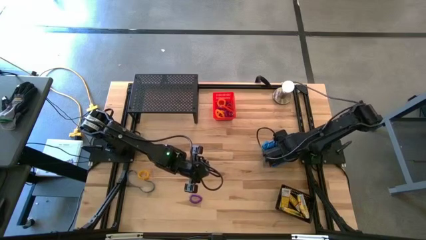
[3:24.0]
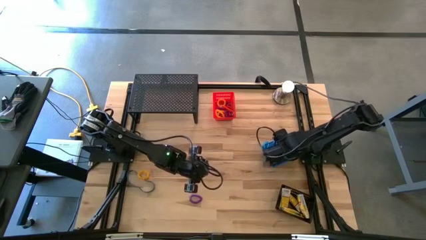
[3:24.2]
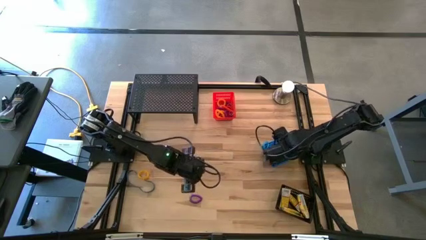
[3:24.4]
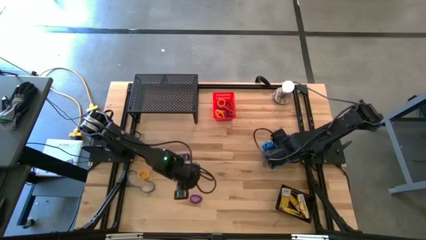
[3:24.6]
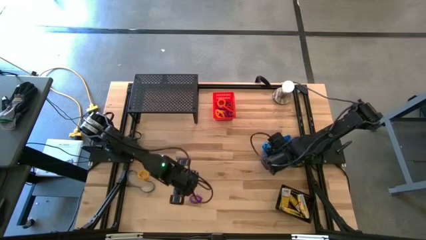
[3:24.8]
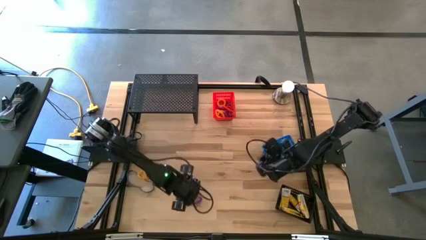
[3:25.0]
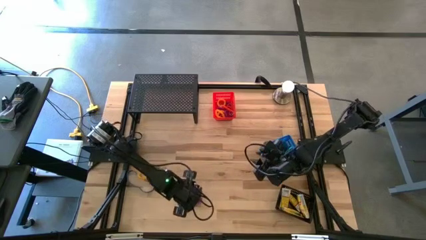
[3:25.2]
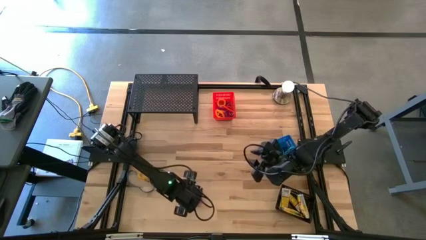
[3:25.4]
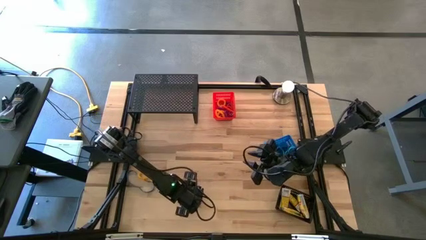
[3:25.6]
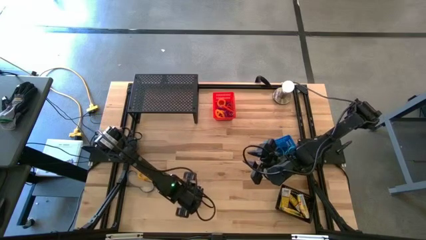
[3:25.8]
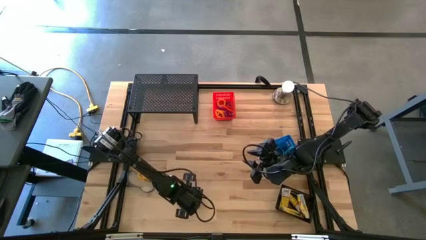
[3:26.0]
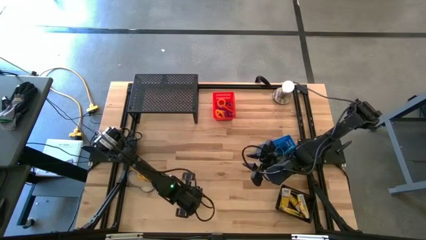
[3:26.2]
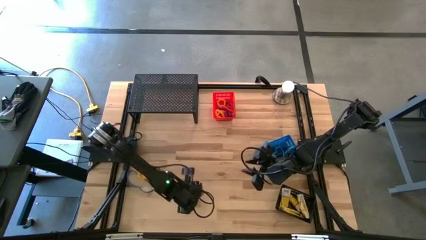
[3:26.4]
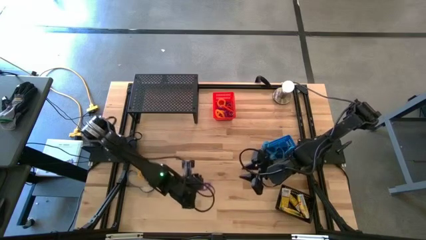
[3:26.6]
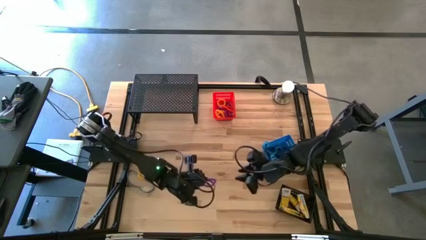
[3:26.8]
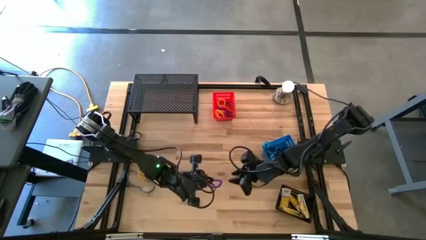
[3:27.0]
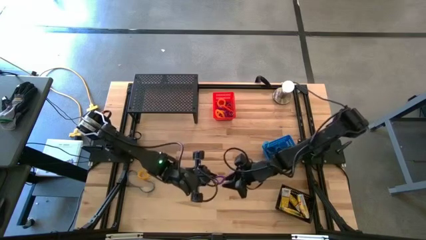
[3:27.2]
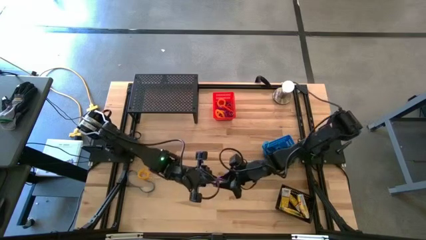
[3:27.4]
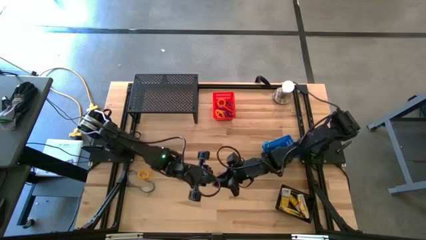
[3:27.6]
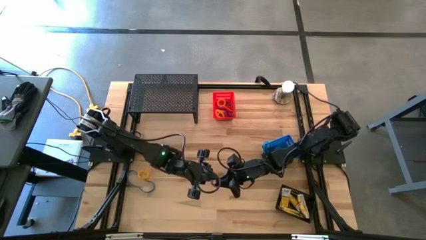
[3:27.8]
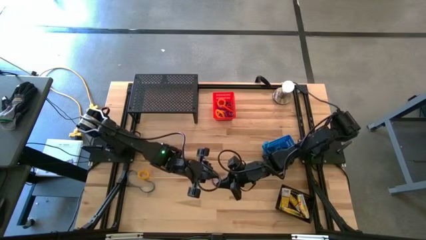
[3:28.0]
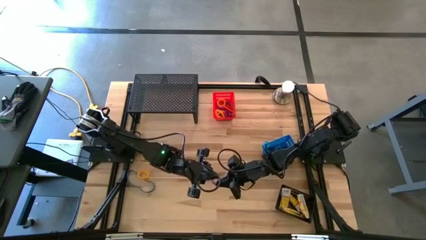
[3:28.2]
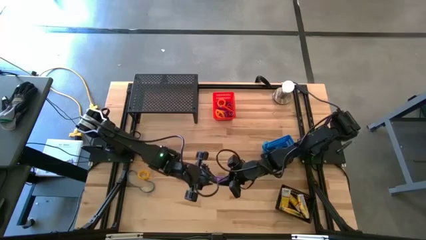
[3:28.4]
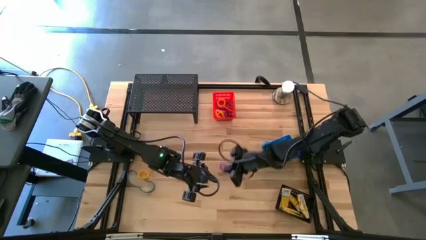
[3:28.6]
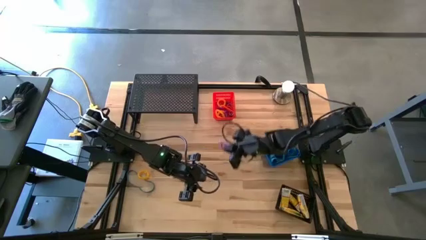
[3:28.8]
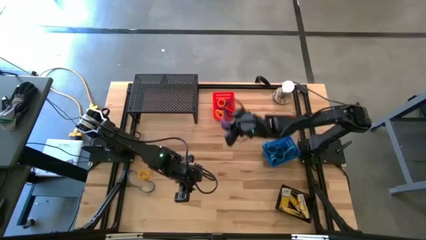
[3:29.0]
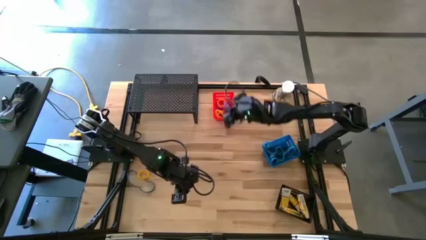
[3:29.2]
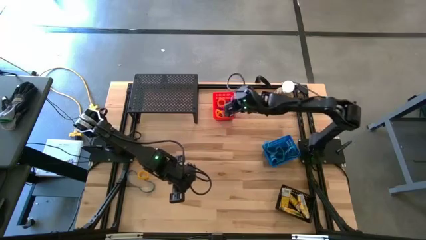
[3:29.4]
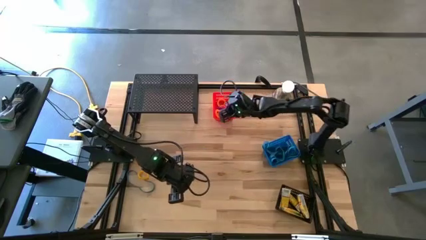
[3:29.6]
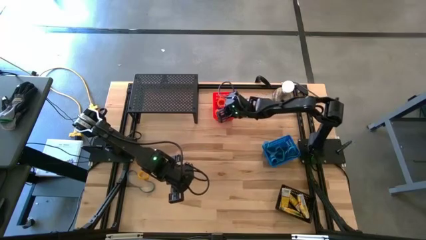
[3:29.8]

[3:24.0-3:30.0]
Task: Pick & Place Office Desk Supplies
Put the violet spring keychain into the red bin

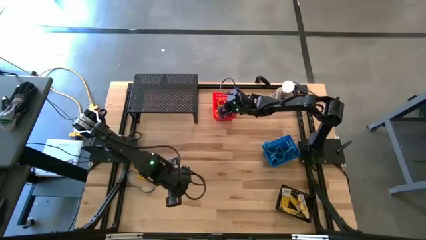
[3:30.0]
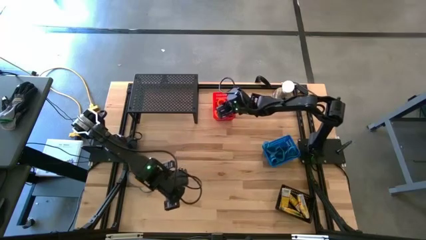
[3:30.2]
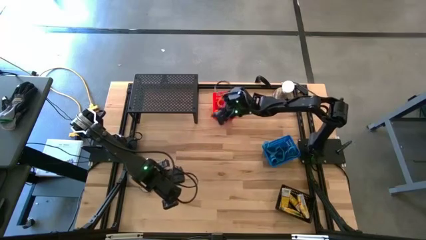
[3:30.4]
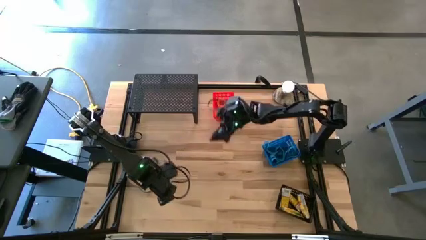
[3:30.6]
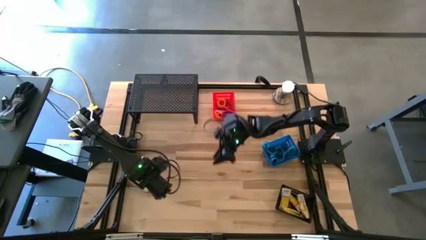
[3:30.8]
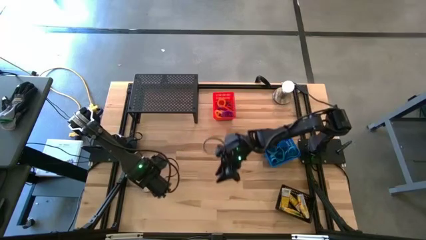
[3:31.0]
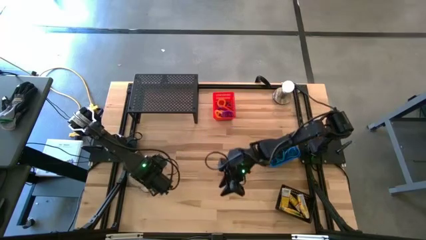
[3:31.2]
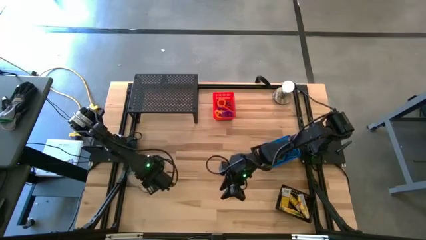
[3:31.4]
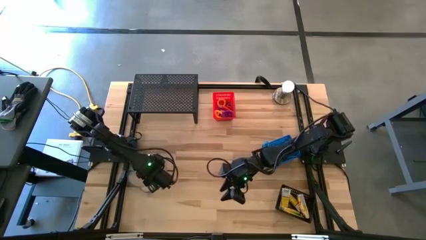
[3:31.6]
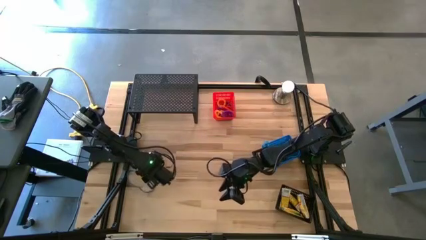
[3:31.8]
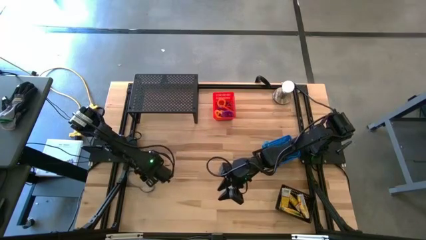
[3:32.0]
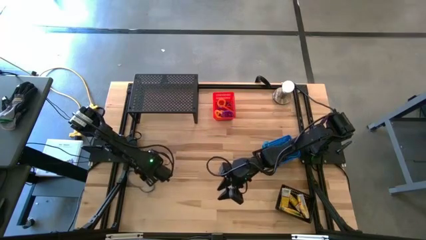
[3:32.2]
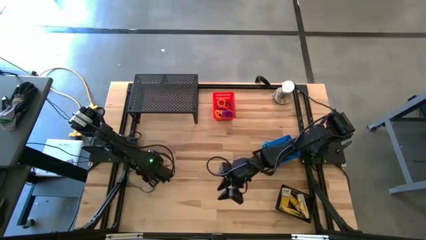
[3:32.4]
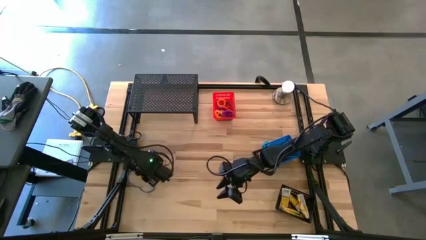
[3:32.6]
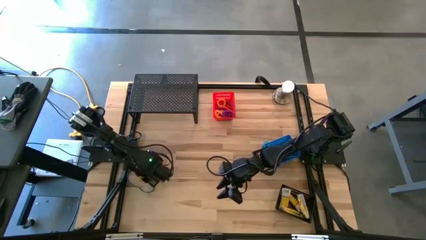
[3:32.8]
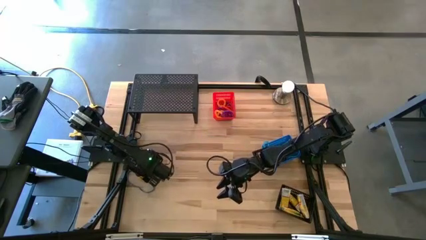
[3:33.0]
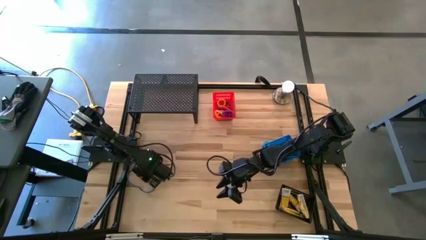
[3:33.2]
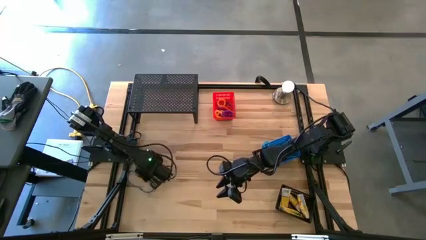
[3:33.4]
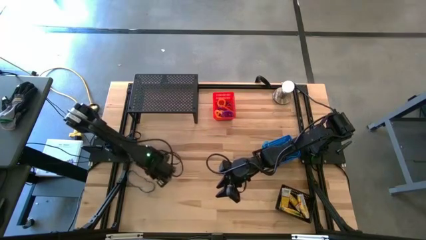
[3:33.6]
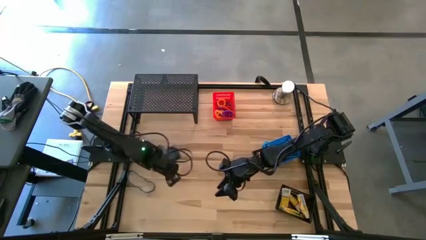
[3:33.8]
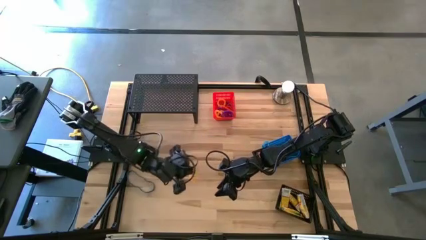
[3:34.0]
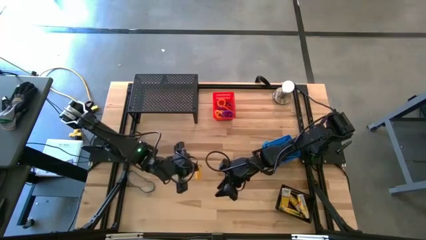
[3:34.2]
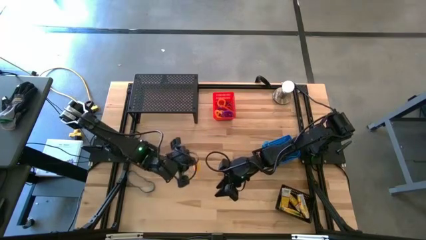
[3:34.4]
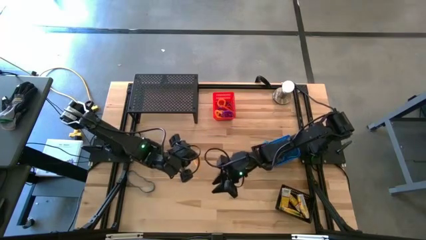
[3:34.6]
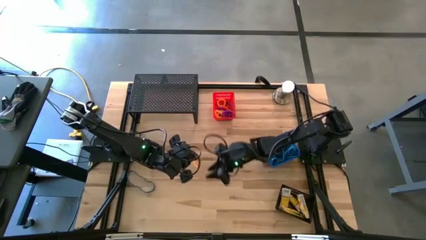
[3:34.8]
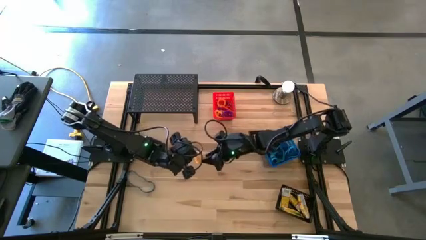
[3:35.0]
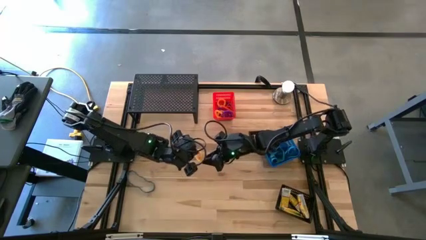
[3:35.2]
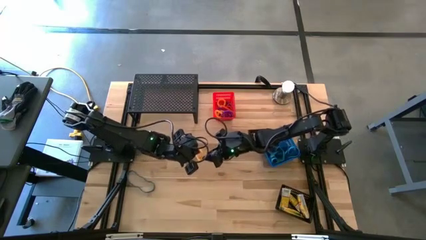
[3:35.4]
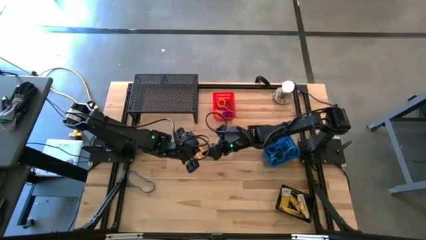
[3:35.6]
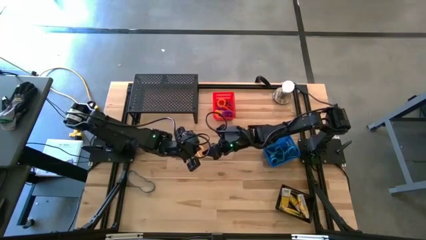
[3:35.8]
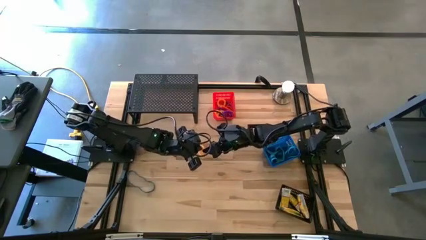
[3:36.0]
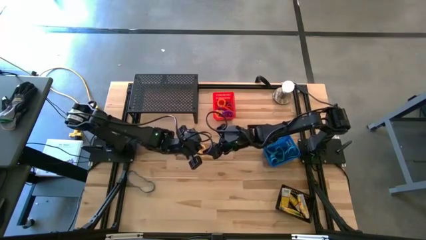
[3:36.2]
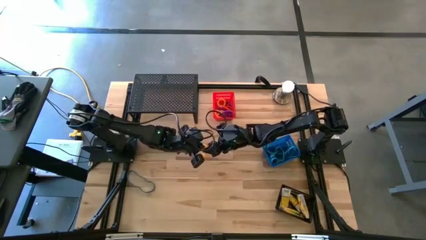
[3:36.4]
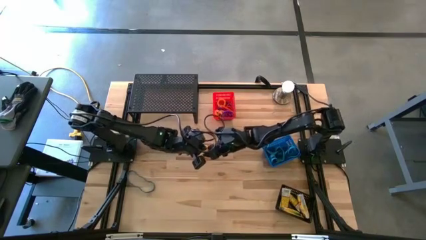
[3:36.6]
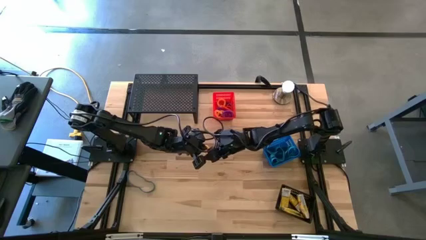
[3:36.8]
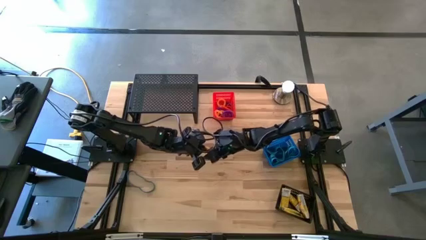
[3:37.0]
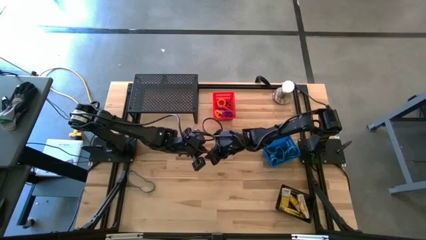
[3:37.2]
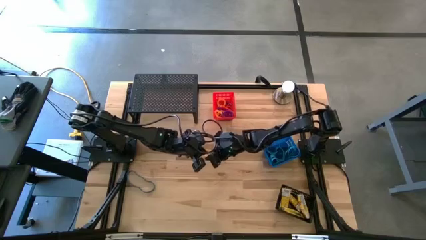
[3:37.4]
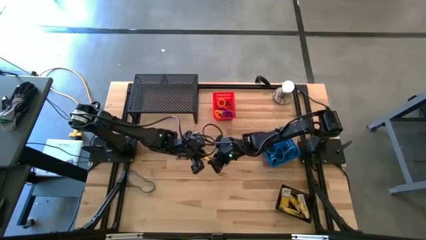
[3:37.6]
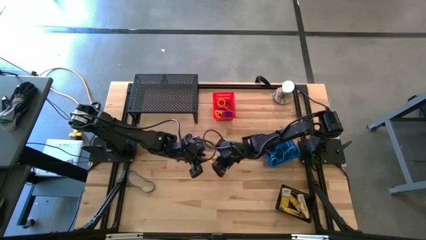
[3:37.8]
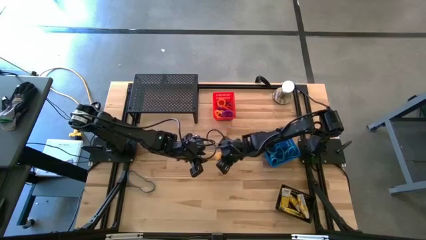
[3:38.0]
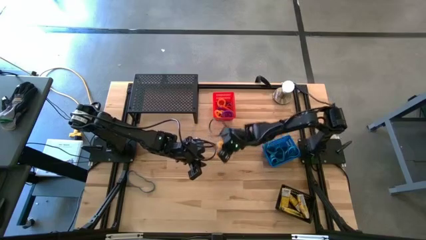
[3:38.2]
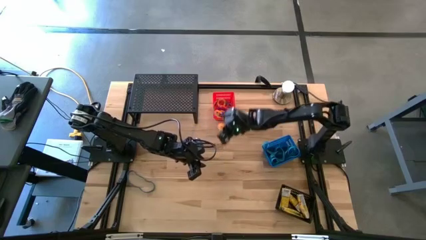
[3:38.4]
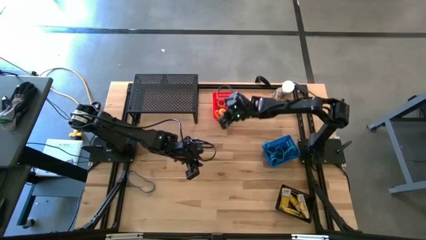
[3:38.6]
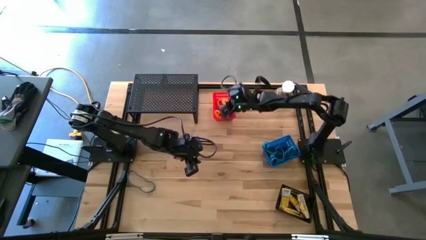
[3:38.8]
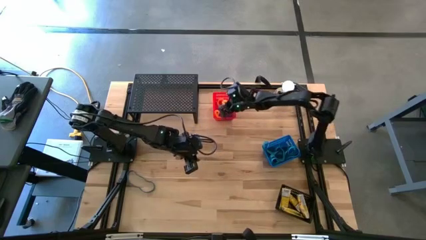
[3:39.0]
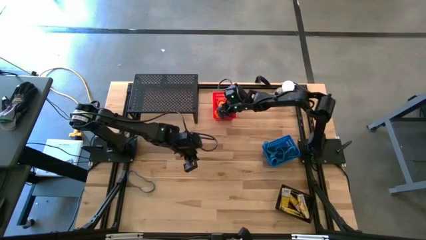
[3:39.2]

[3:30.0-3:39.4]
Put the yellow spring keychain into the red bin

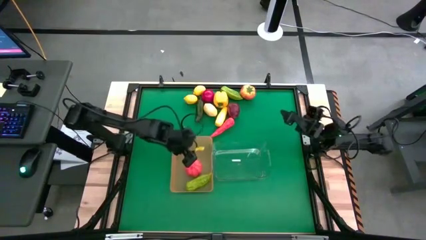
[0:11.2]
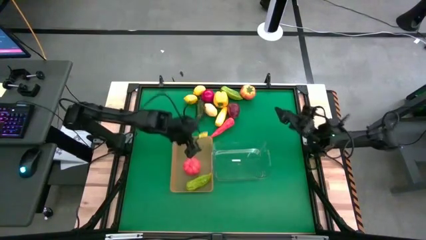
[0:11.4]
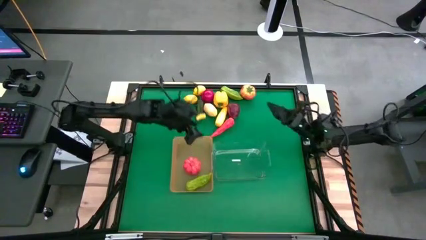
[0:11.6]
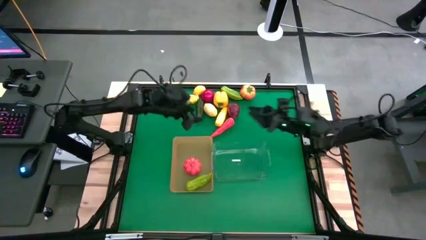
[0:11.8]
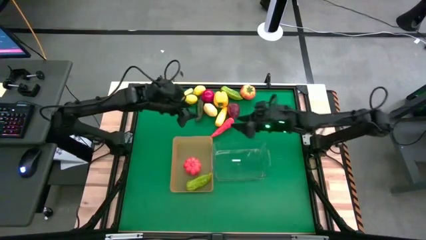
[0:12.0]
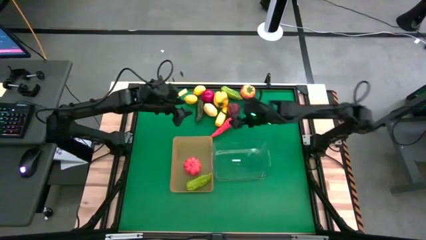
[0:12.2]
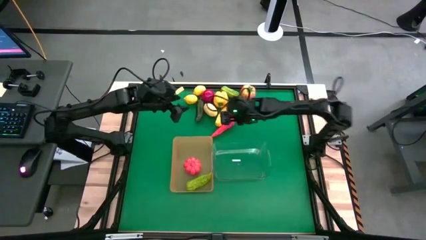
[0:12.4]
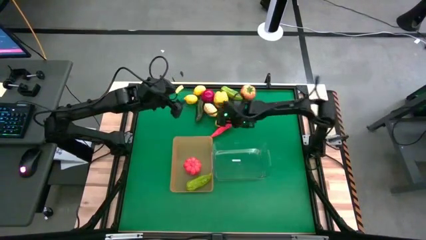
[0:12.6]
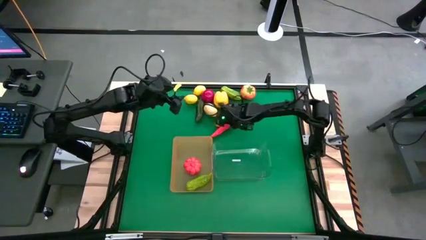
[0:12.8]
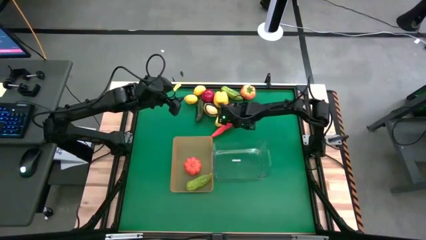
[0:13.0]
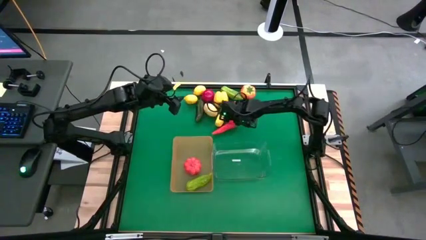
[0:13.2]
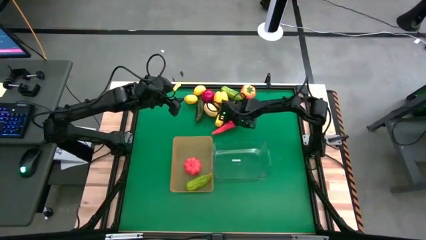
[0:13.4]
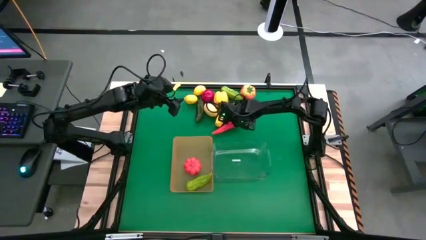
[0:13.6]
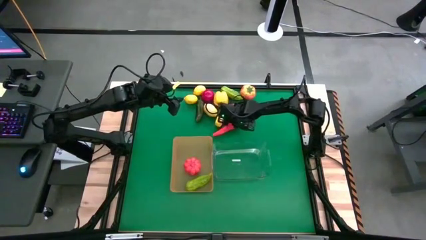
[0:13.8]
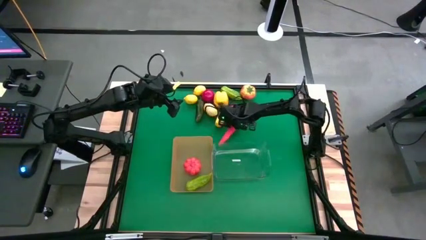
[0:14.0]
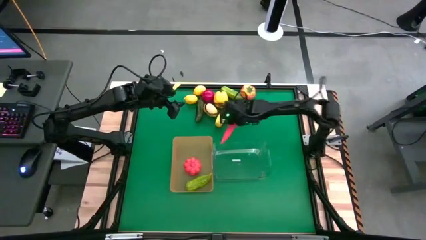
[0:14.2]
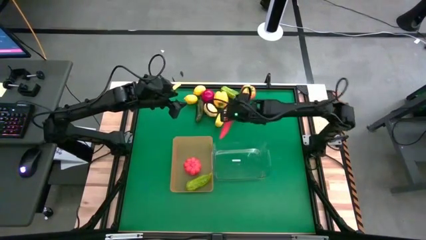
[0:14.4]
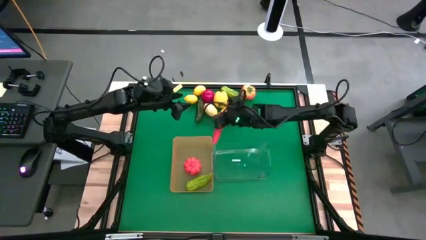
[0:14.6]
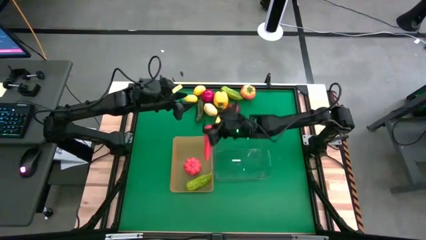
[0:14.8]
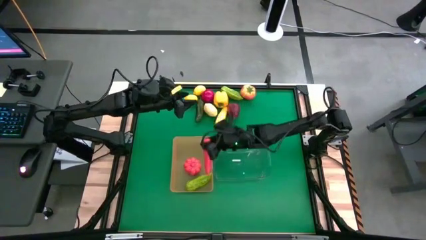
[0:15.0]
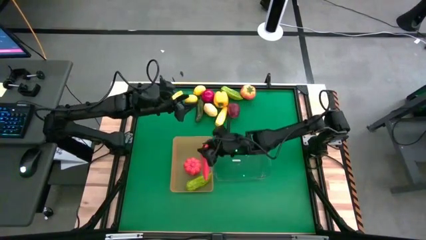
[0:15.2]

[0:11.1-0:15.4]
Task: Sort produce into baskets
Put the red chili pepper into the orange bin
